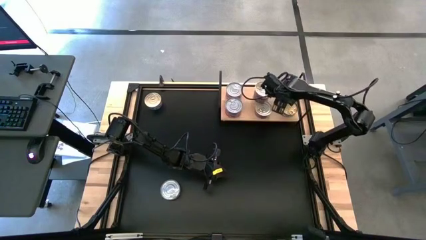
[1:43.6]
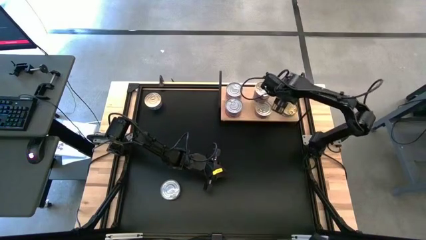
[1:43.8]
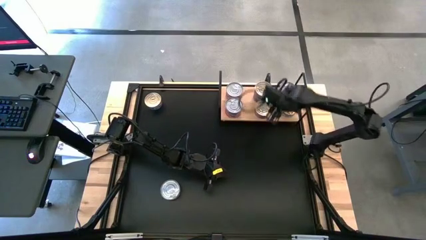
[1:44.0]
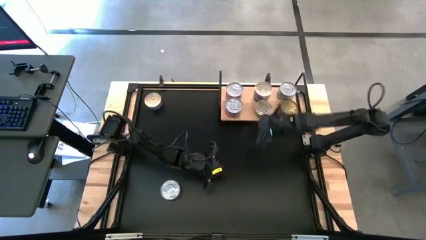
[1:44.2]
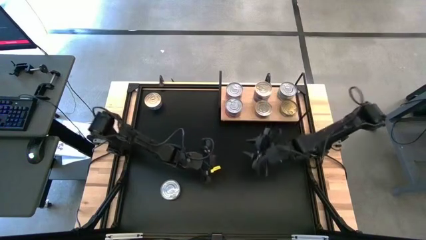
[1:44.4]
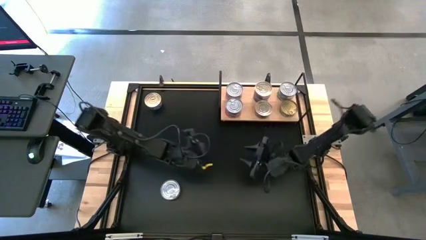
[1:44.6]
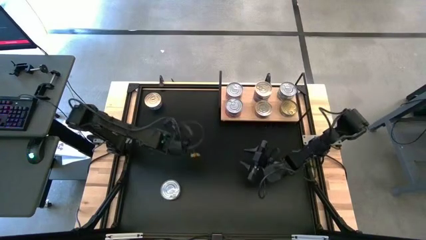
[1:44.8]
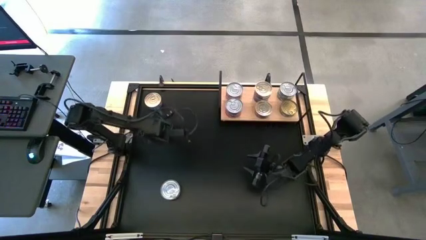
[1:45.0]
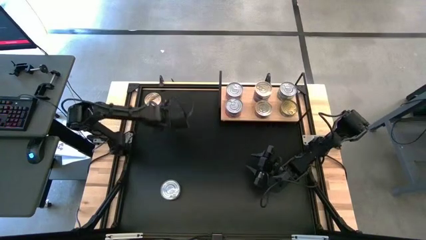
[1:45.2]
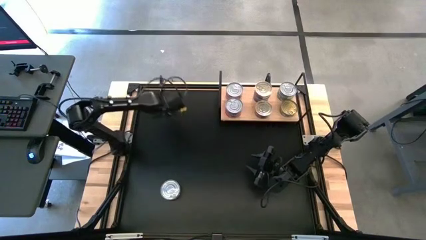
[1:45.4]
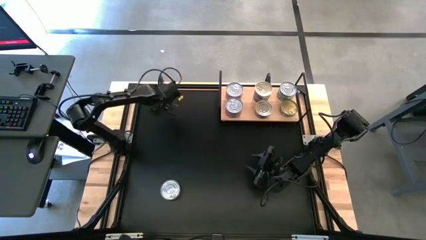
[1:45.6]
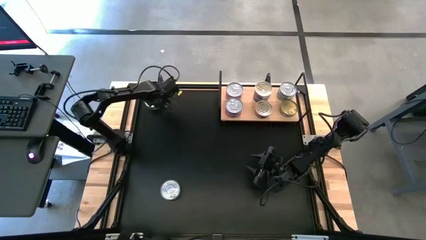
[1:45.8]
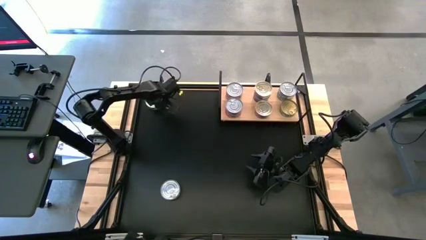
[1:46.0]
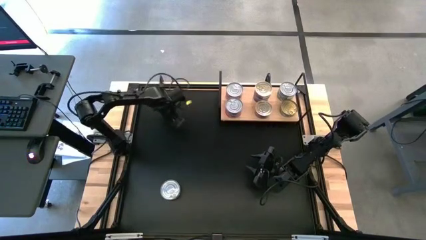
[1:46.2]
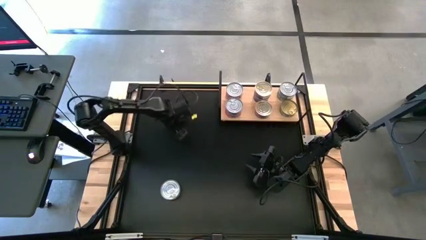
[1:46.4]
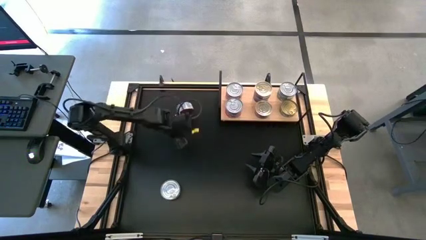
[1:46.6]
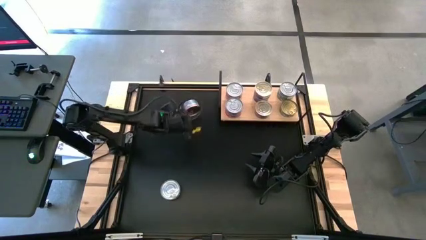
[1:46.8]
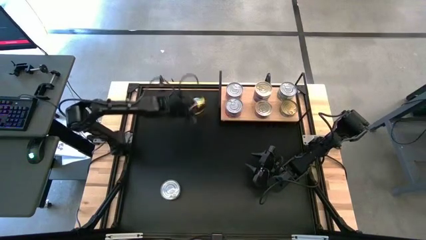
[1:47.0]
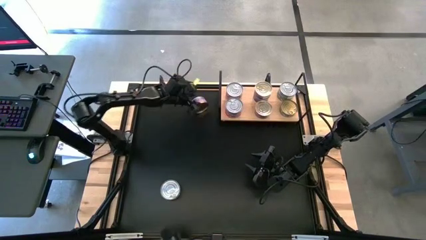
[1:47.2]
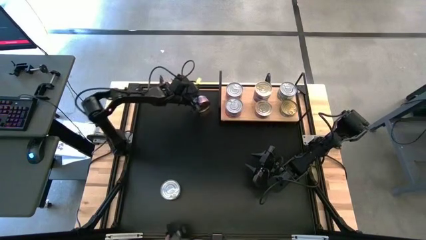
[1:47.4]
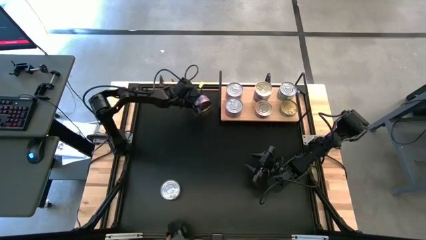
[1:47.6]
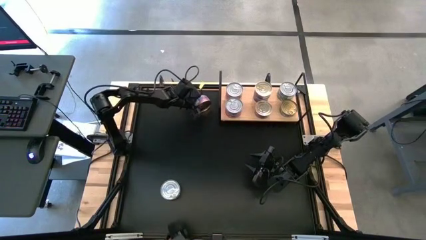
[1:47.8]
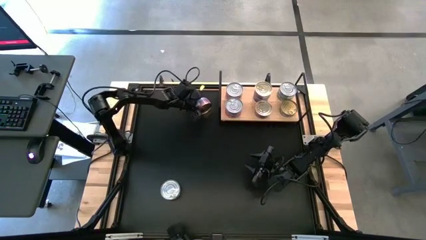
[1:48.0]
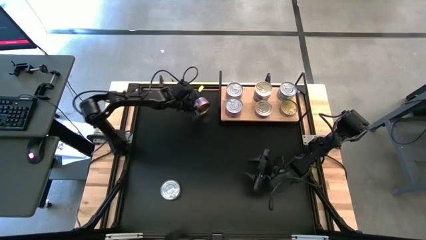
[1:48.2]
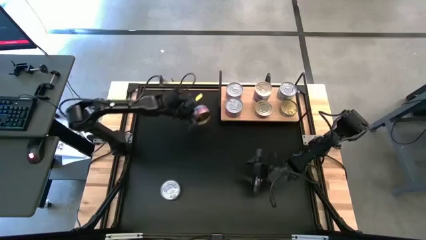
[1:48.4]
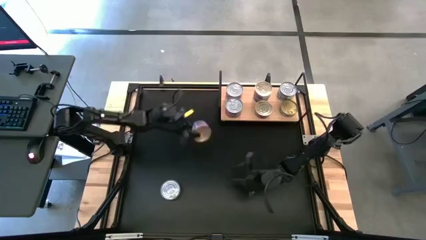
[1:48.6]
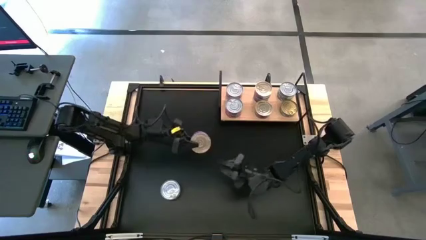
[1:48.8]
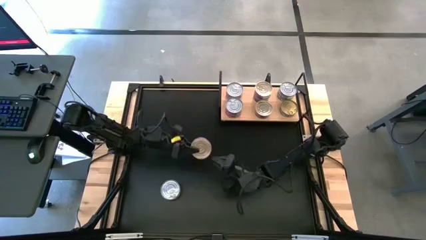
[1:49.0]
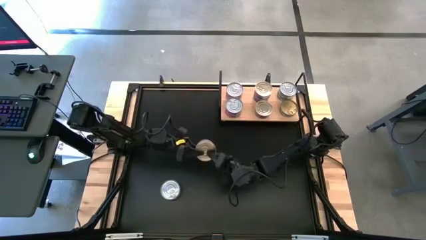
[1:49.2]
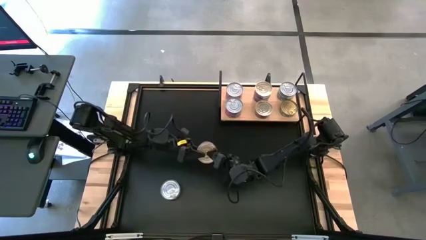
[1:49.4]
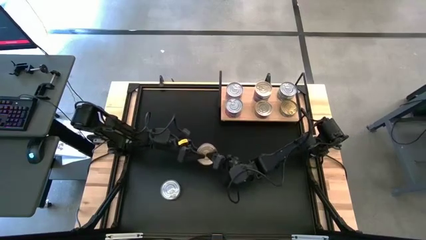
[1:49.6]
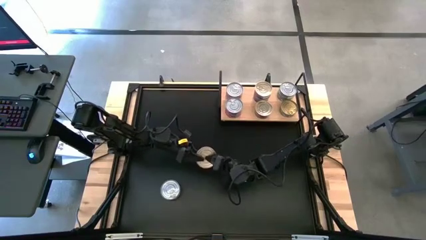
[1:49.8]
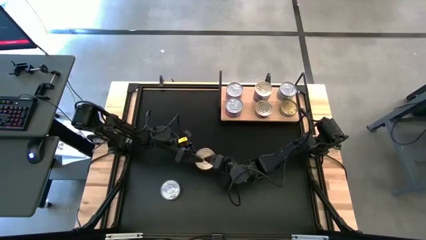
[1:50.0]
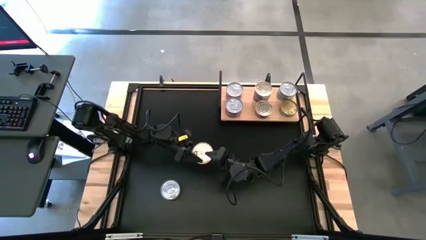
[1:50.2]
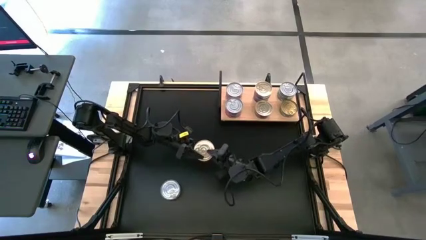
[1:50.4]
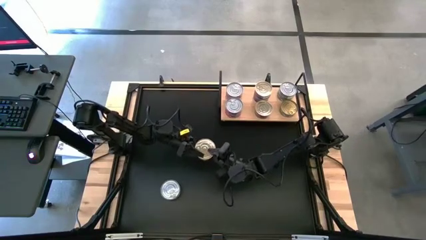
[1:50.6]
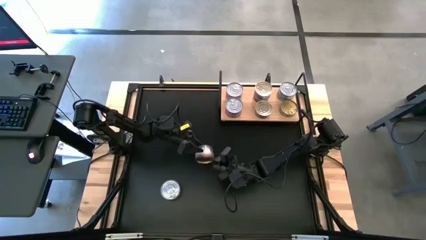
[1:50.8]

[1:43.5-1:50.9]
Task: Stack canned seafood by type on shelf
Stack the blue-pink tuna can on top of the other blue-pink tuna can on the shelf

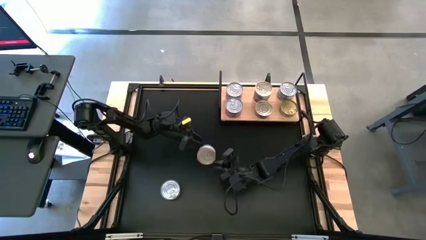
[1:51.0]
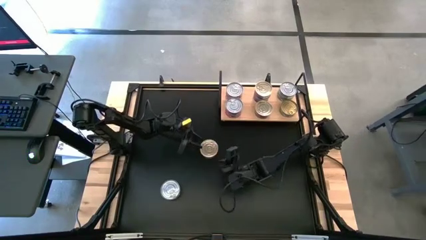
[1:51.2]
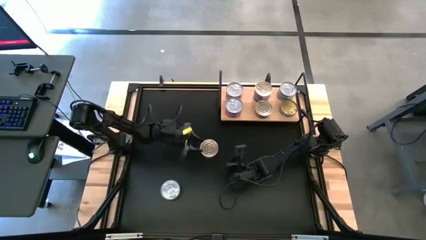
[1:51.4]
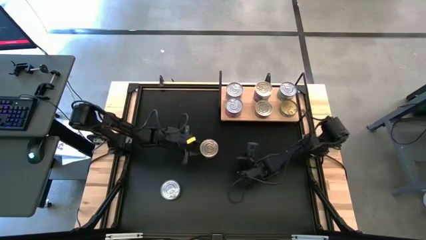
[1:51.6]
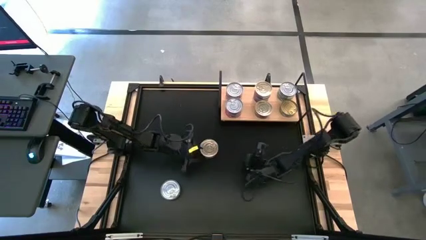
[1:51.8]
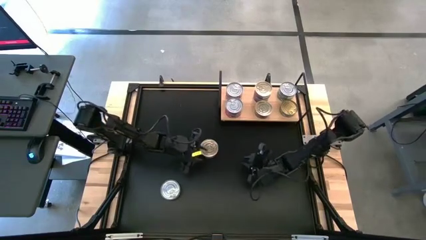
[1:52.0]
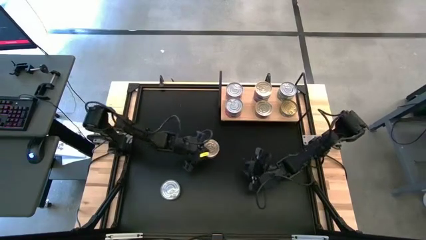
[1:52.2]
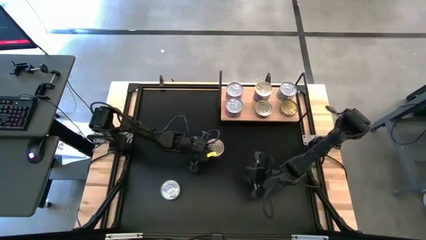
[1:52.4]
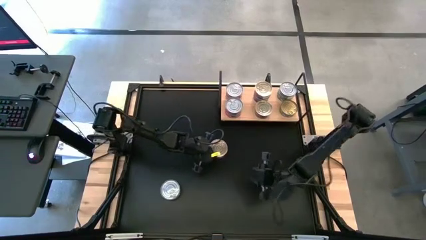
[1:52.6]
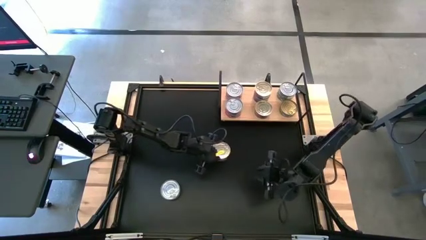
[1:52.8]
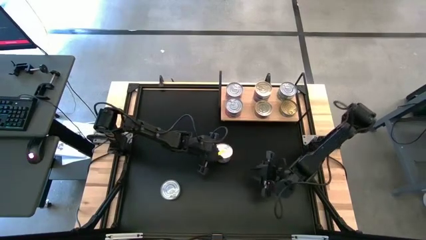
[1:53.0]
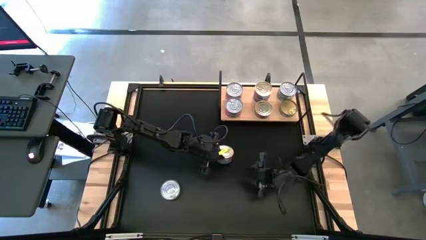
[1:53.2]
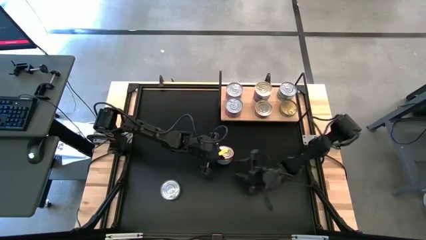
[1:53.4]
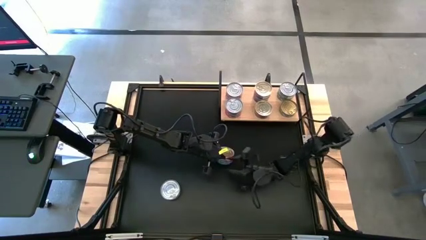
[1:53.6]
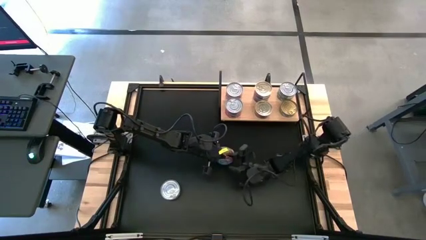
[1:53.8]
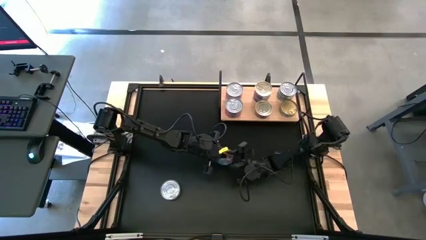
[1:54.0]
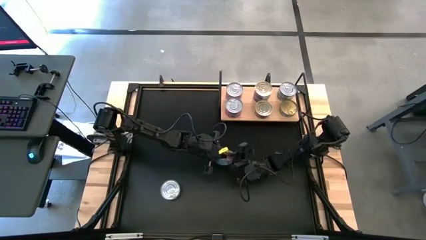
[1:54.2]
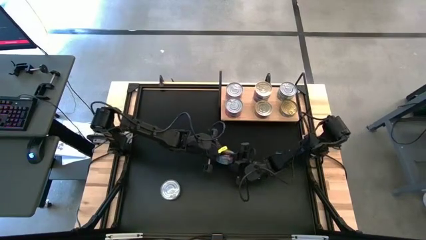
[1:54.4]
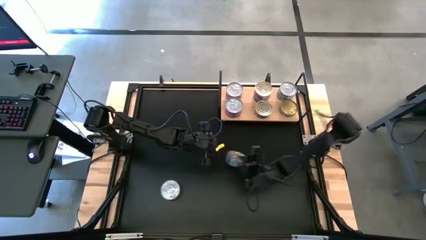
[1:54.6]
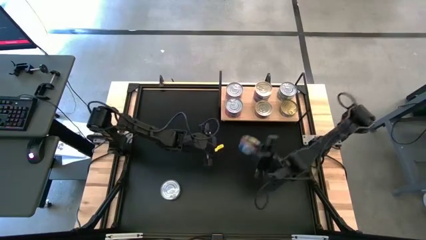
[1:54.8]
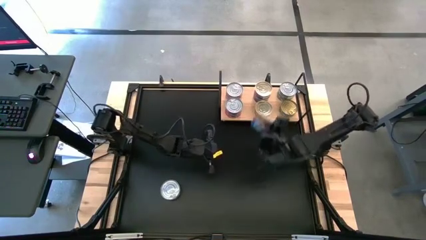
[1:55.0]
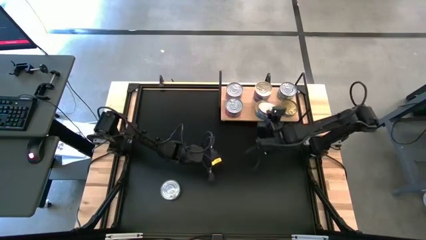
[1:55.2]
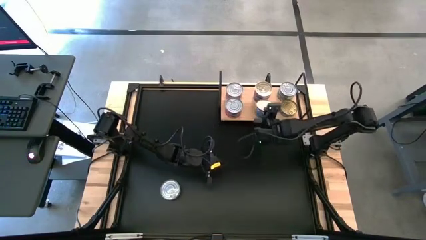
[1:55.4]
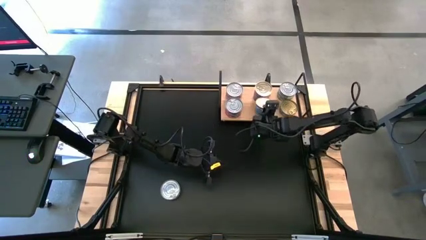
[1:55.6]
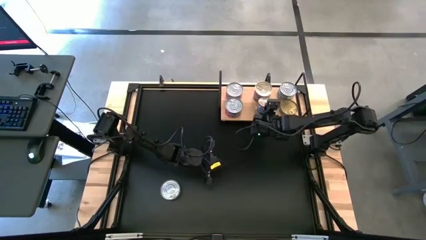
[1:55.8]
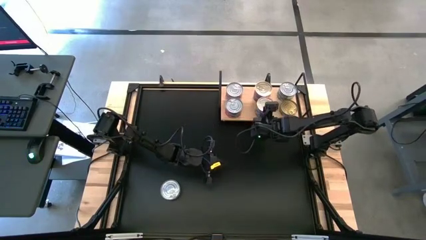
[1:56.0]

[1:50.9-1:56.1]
Stack the blue-pink tuna can on top of the other blue-pink tuna can on the shelf
